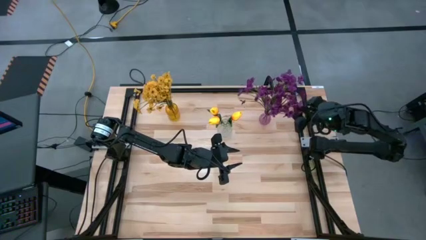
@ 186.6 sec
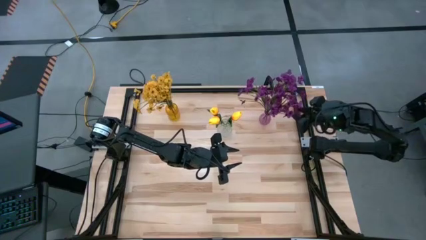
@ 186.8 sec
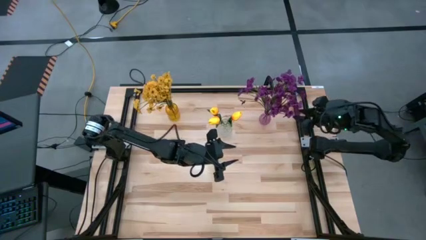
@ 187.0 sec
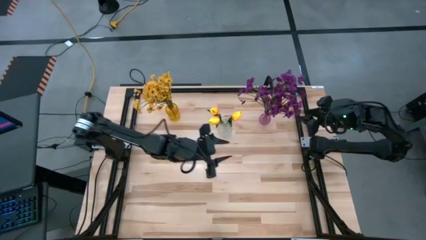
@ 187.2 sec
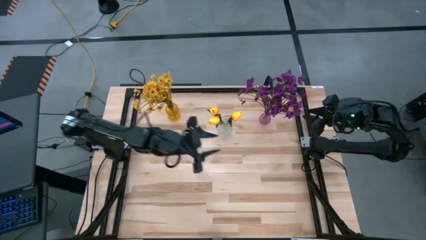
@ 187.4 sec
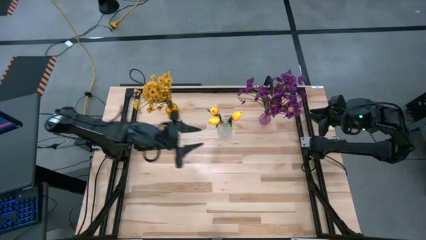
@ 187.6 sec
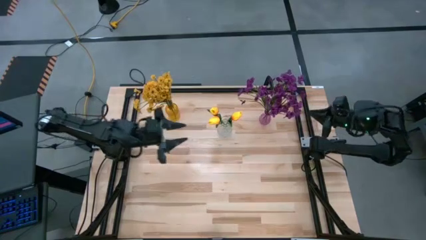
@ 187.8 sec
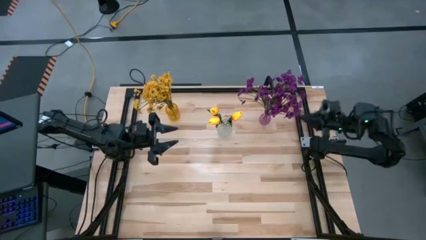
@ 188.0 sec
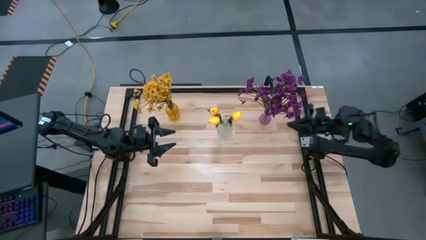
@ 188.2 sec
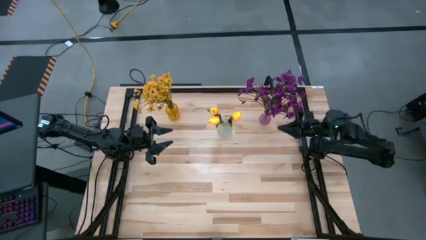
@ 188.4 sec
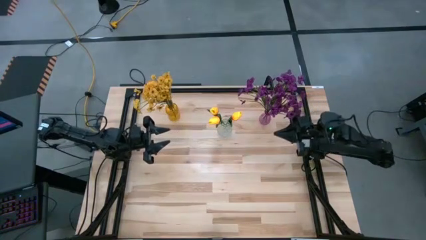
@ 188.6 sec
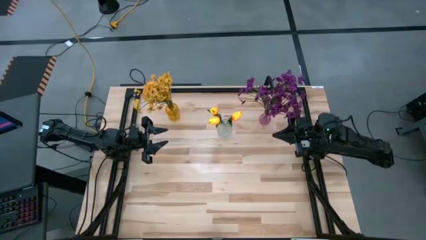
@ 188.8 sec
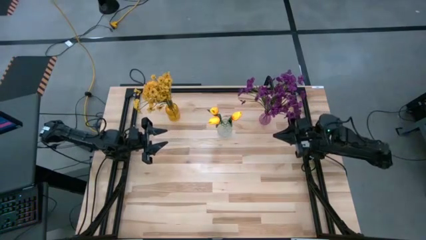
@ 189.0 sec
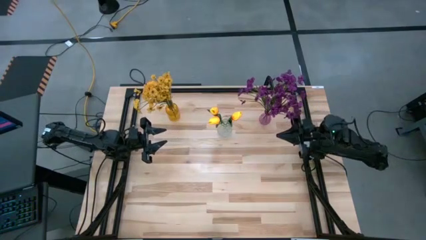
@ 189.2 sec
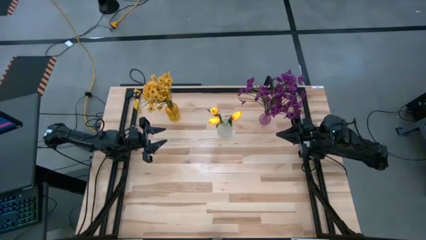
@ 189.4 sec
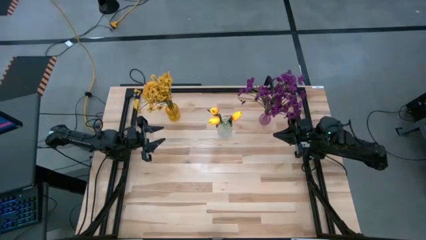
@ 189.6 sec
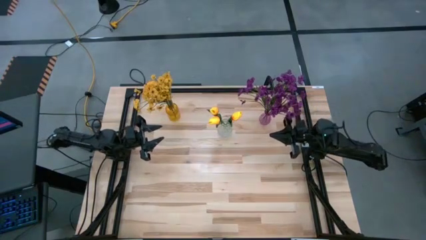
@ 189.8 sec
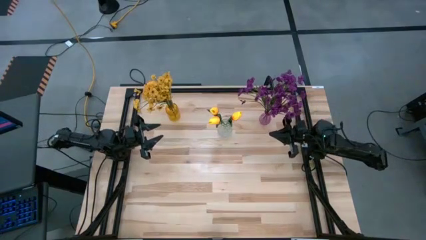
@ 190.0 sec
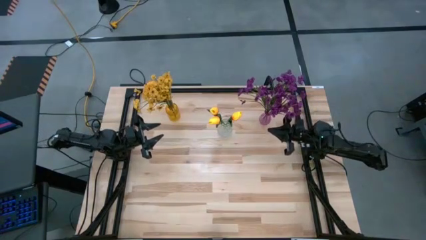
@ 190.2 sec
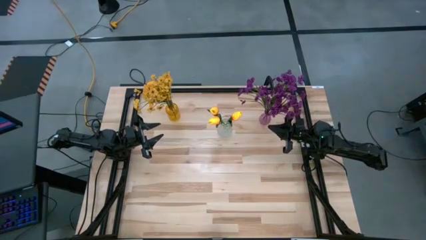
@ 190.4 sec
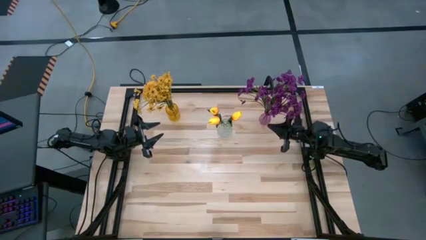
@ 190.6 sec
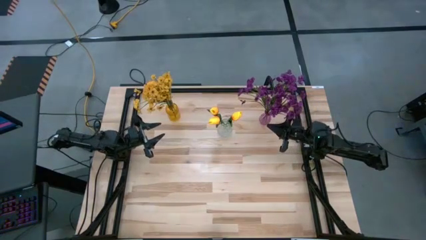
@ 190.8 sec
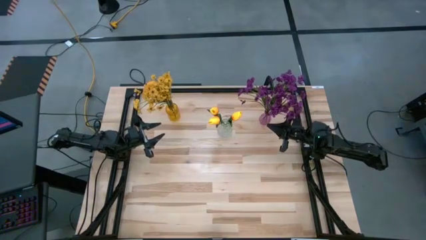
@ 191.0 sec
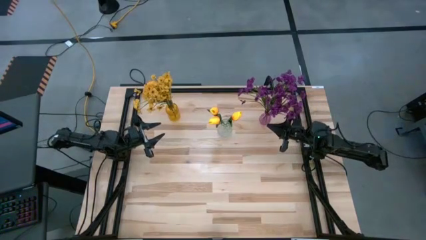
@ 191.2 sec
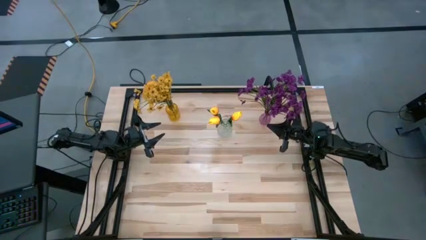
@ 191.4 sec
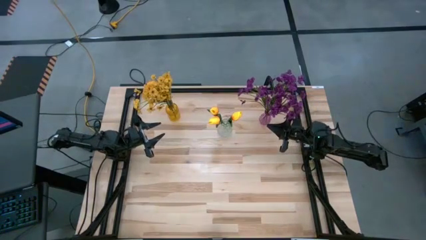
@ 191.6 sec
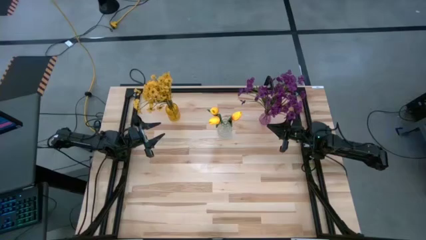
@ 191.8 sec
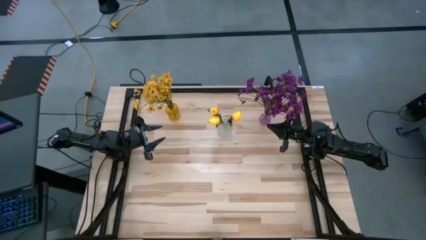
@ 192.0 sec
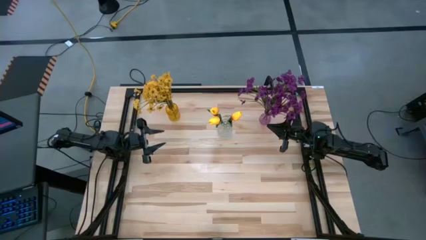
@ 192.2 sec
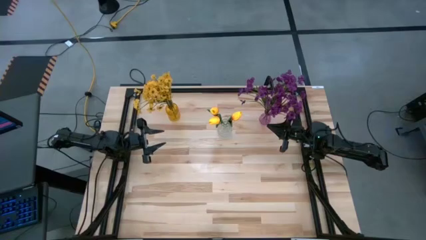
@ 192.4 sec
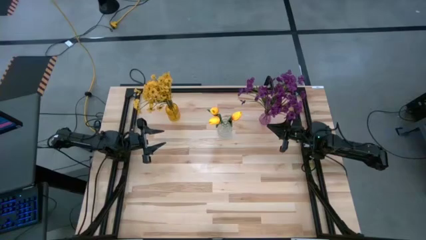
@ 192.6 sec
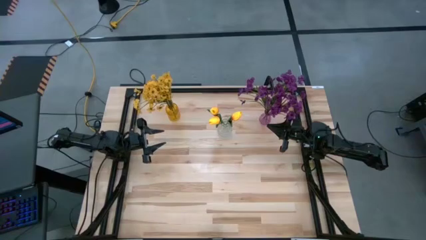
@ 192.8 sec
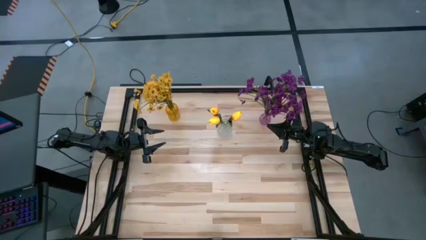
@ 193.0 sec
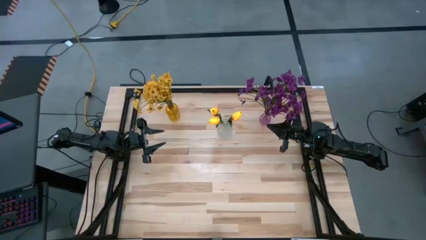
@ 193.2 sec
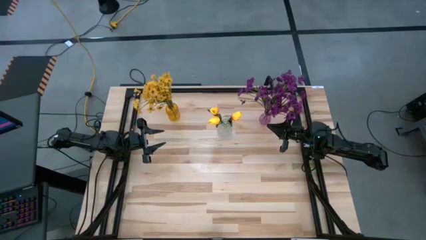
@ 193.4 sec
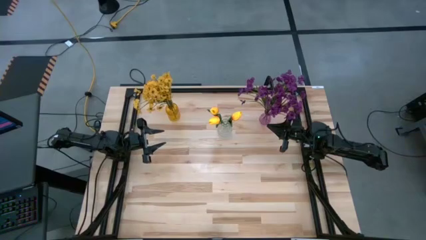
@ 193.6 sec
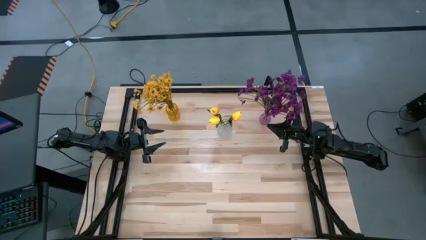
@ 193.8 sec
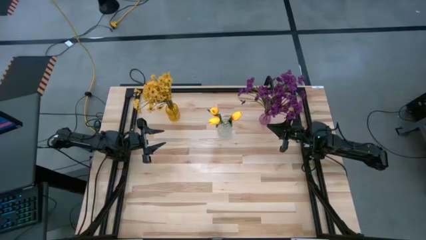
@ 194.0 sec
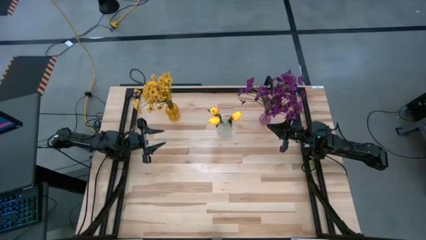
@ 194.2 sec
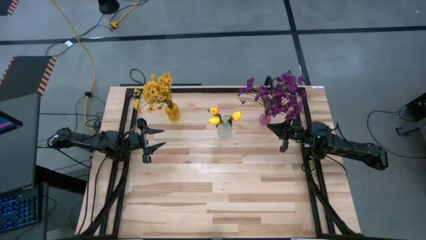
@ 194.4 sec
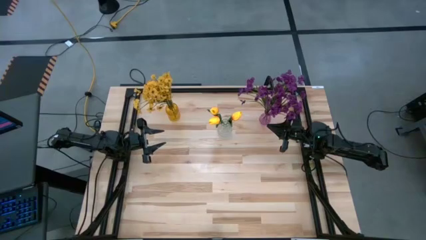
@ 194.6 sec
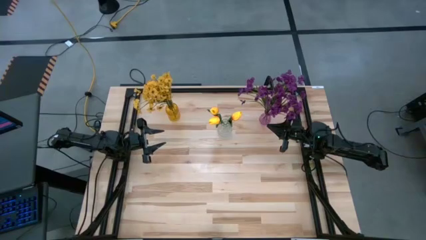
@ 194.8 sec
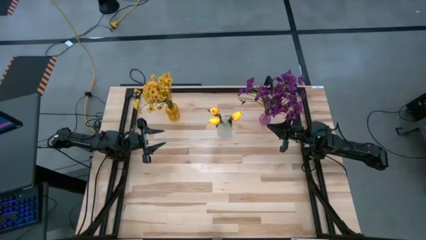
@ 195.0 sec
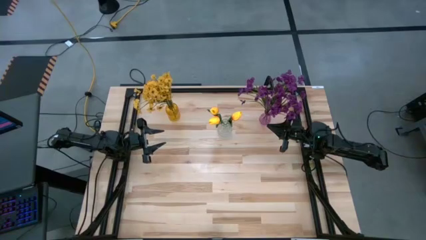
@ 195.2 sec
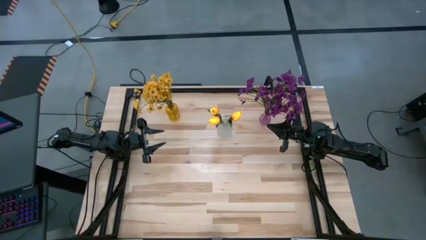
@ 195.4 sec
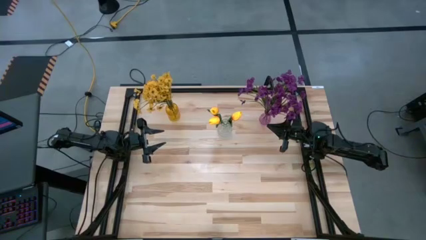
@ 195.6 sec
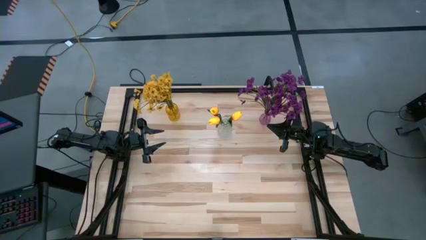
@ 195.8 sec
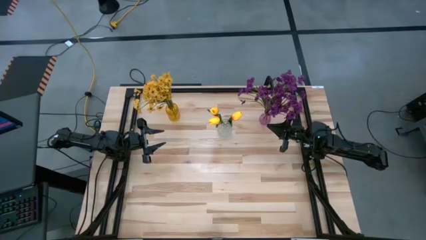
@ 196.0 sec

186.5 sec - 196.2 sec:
Task: Sort flowers into vase by color
Return to Home Position
